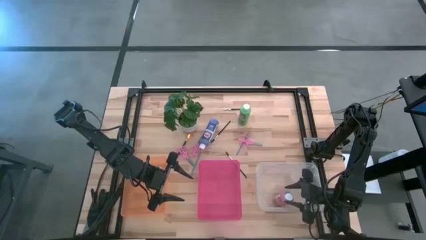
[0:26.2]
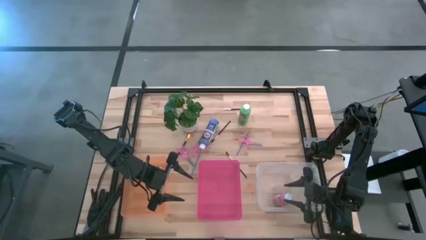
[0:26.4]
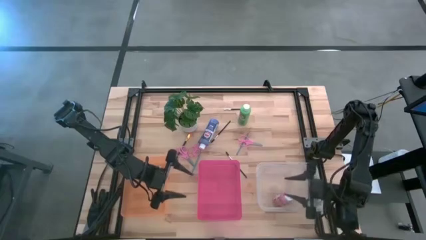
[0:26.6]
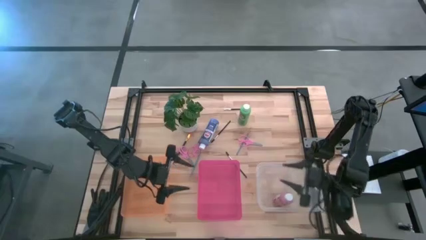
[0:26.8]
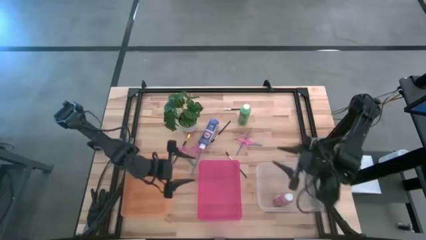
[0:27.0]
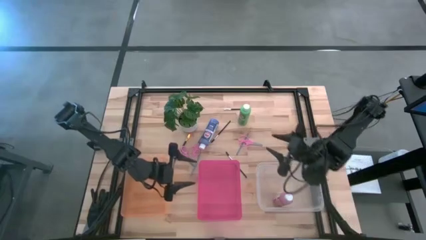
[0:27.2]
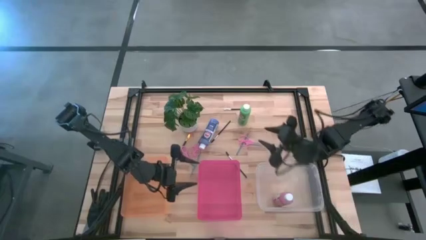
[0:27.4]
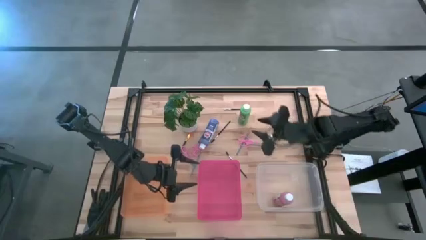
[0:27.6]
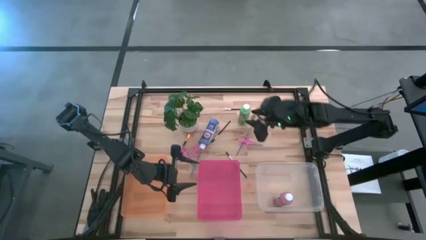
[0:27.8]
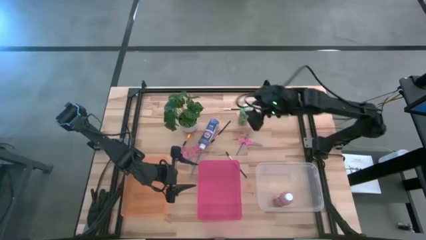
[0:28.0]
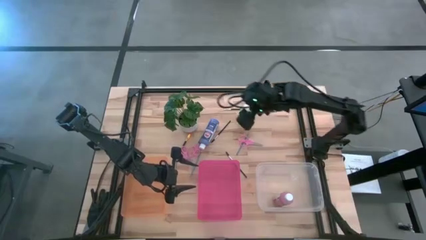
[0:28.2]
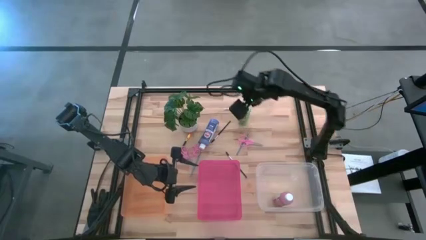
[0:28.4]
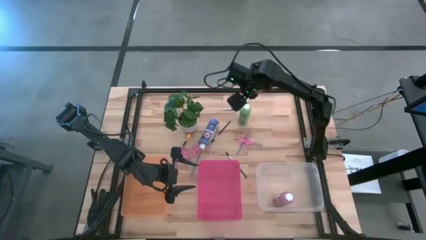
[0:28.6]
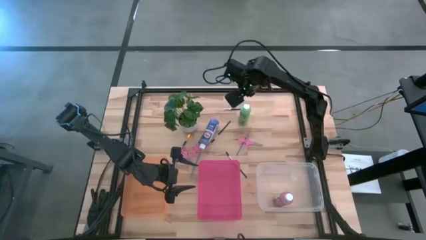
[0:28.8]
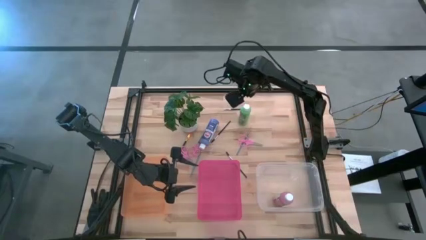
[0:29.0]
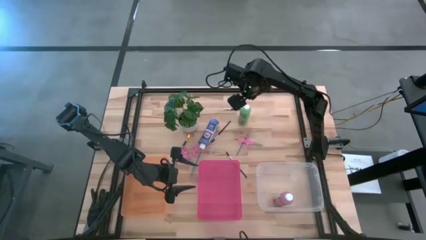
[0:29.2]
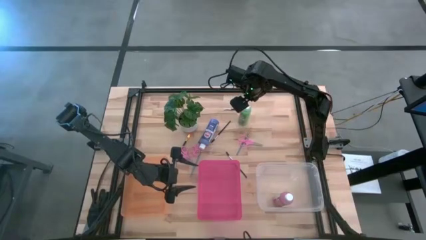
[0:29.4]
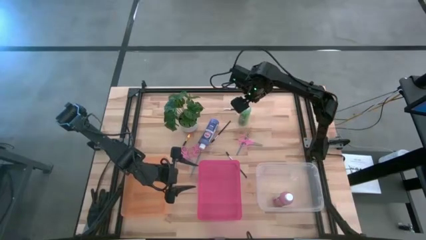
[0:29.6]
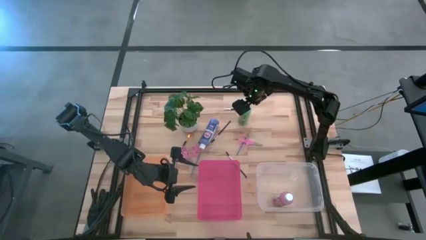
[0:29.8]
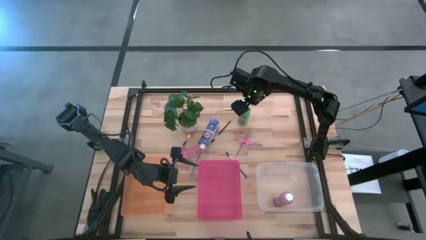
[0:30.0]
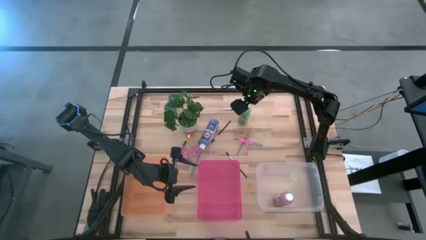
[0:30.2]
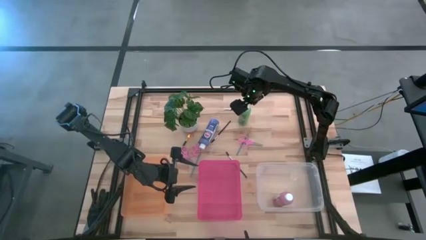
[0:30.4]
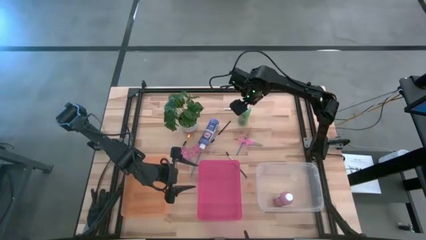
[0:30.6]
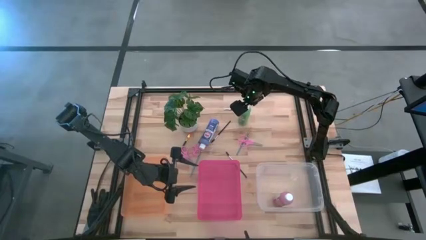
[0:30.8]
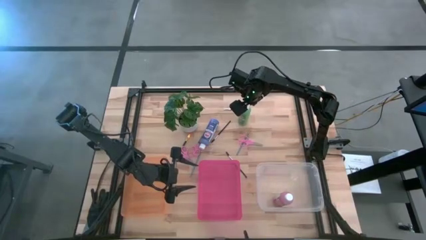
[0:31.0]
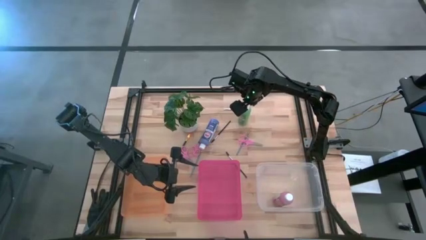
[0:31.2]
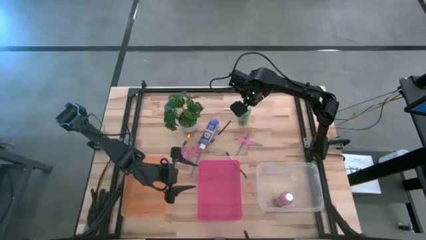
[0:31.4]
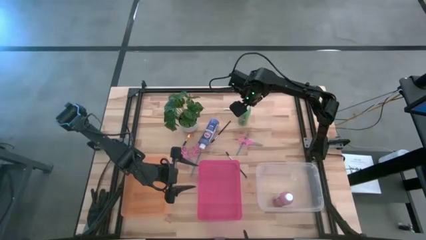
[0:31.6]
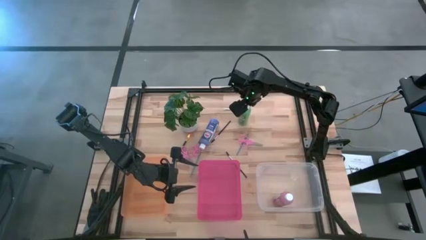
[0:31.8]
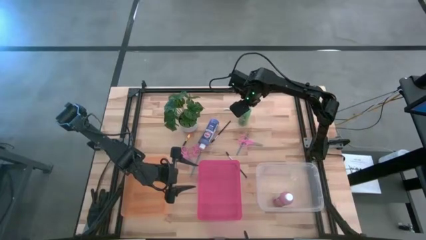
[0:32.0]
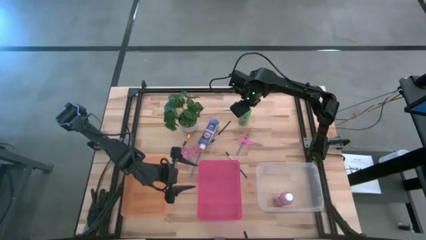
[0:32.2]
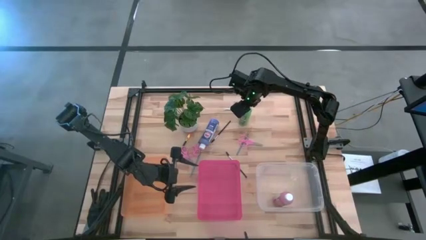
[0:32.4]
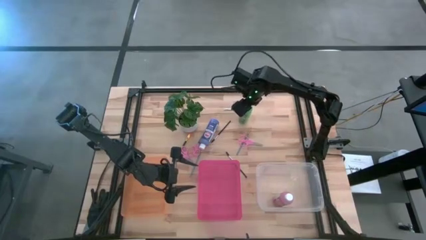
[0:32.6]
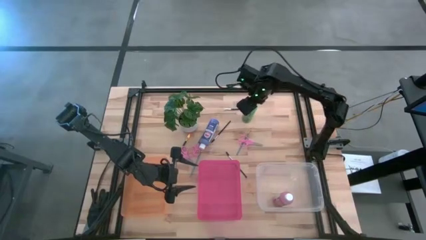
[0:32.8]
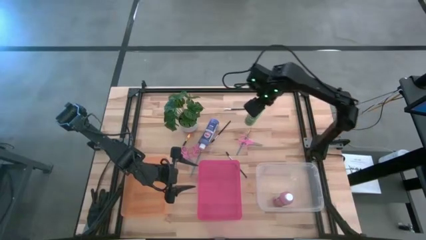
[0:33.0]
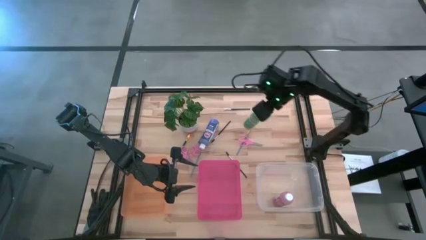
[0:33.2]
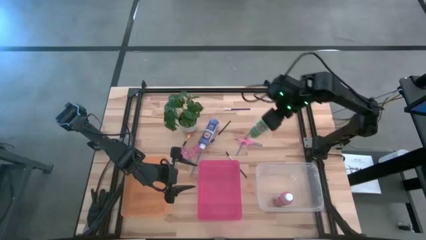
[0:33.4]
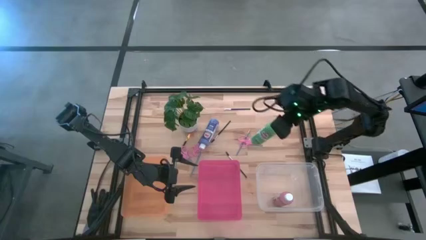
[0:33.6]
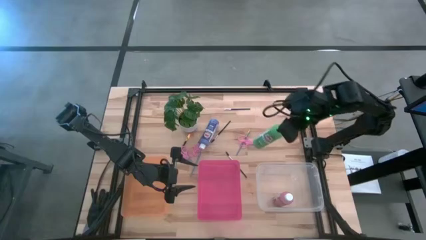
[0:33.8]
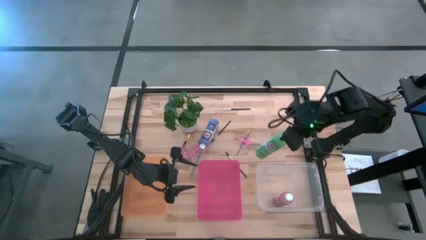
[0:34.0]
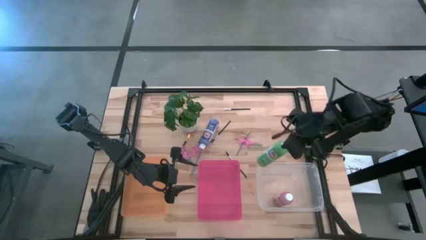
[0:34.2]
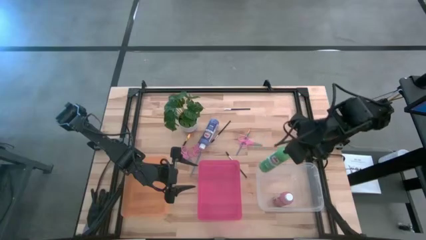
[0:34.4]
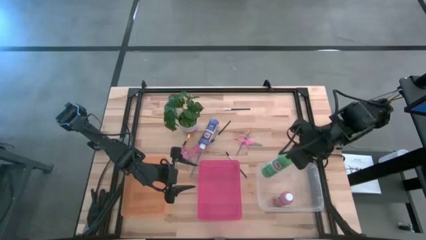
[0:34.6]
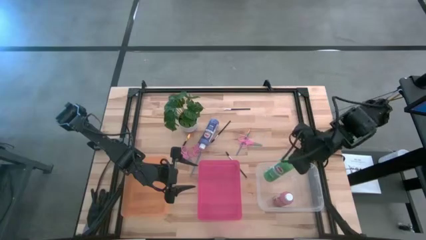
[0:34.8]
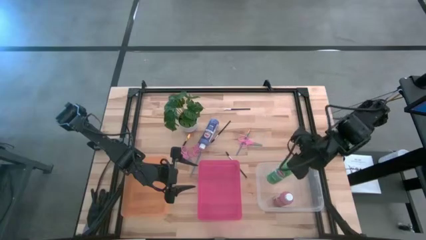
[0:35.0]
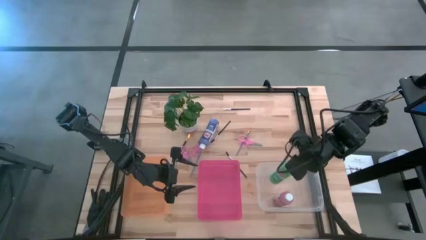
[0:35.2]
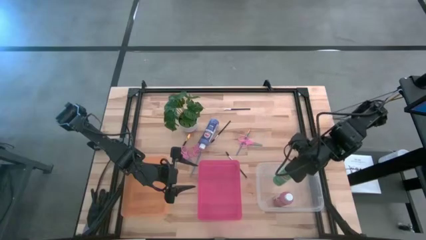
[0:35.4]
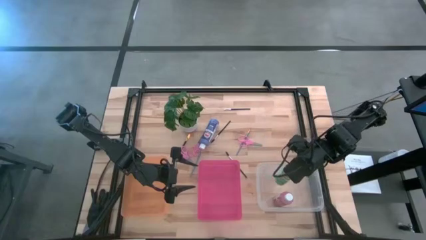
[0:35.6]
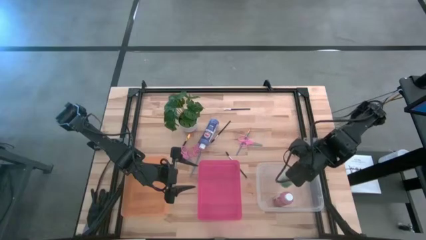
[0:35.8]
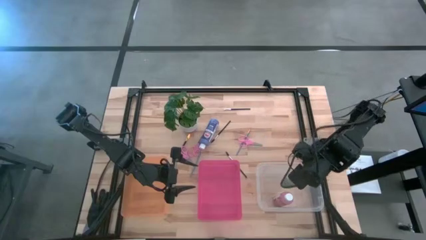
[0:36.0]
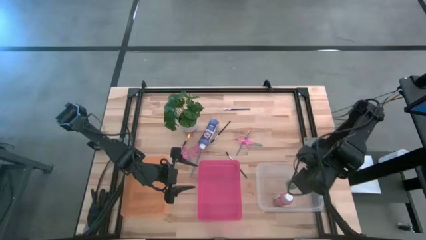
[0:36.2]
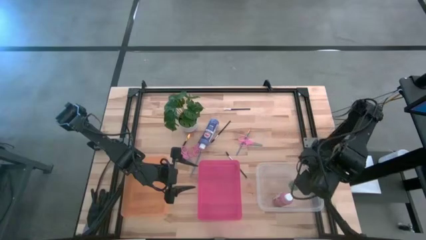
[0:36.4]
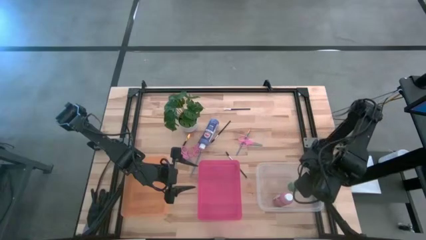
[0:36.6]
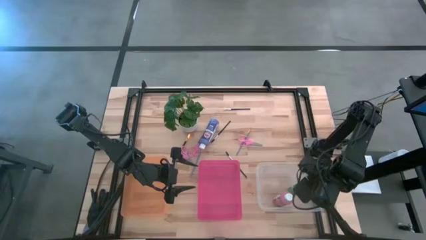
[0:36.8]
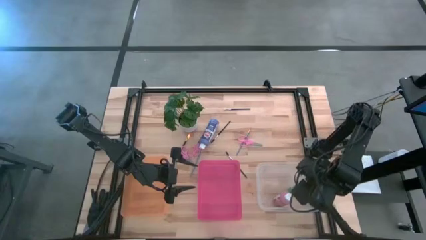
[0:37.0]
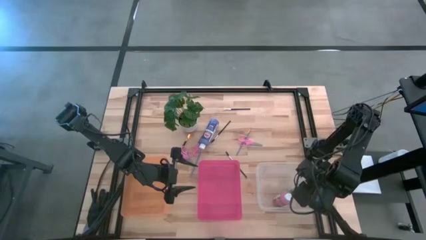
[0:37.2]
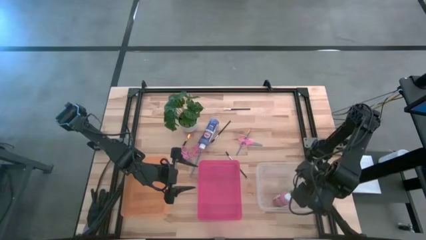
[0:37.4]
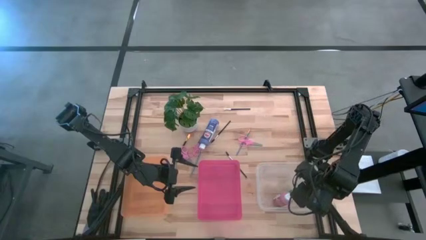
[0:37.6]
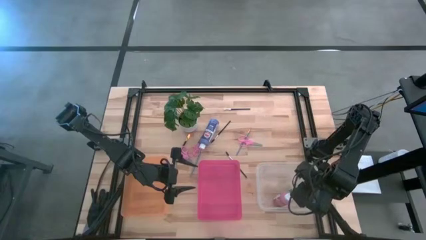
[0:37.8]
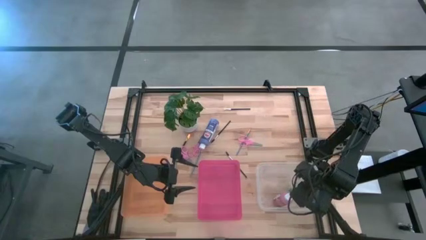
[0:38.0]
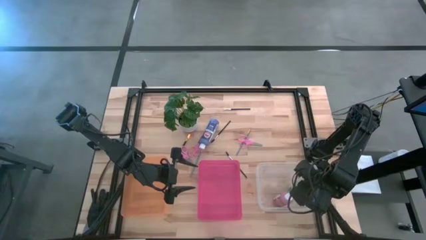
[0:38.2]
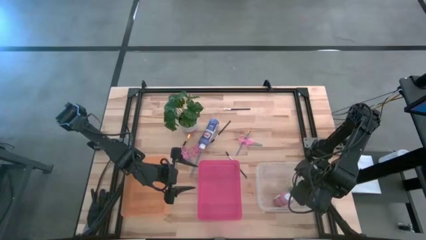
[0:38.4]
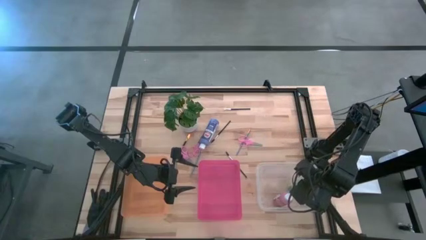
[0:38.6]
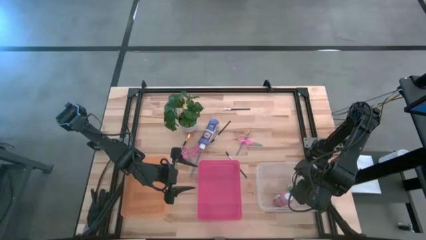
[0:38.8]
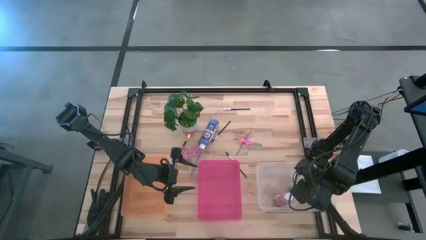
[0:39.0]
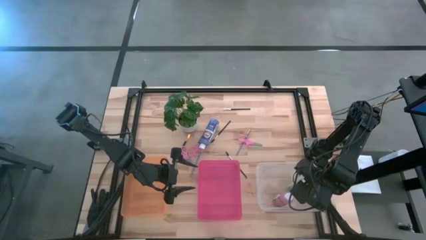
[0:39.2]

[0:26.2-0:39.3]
Task: Pick & Place Paint Supplies
Put the green paint bottle into the transparent bin

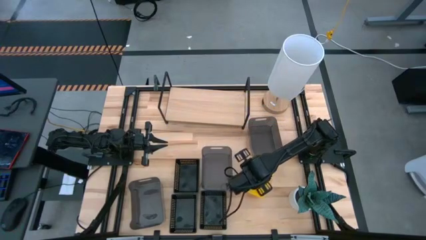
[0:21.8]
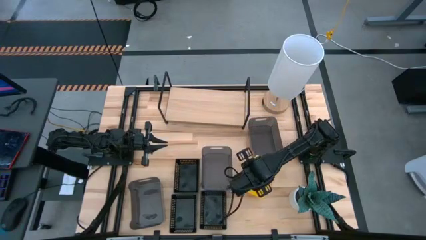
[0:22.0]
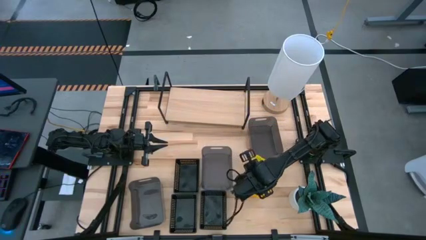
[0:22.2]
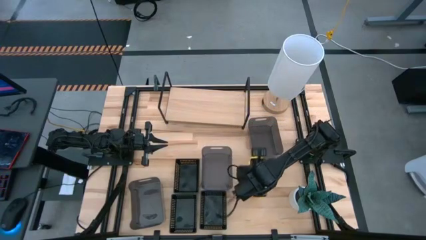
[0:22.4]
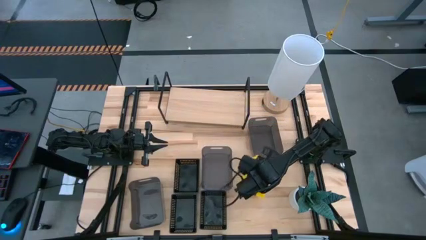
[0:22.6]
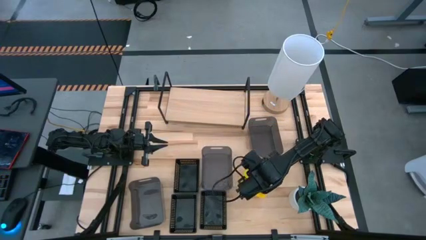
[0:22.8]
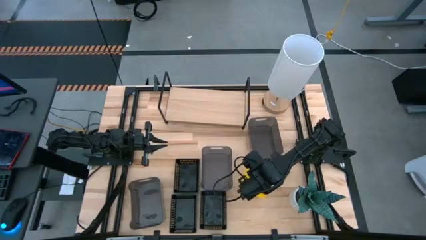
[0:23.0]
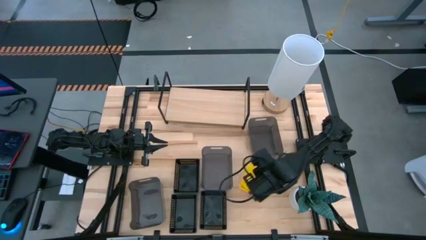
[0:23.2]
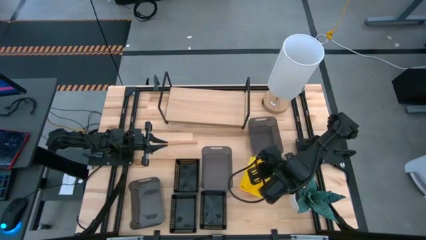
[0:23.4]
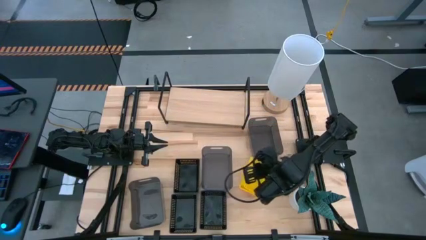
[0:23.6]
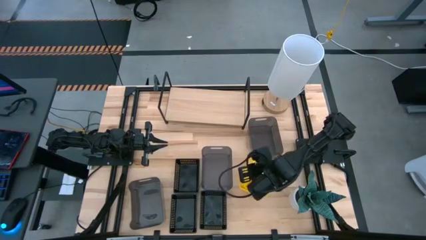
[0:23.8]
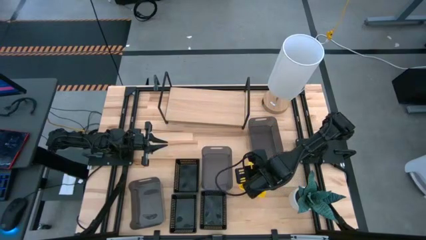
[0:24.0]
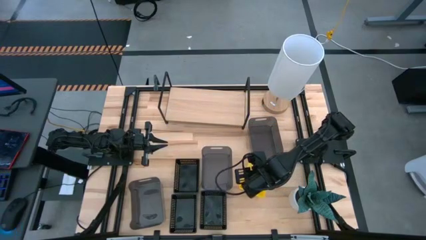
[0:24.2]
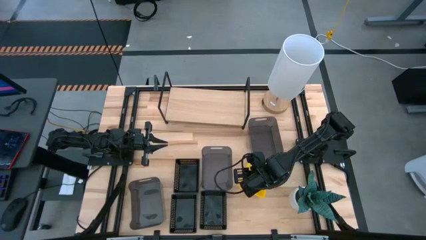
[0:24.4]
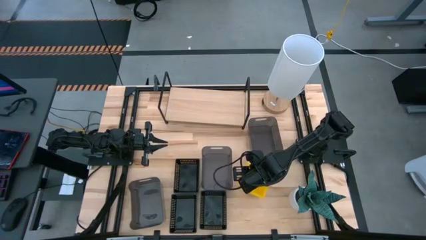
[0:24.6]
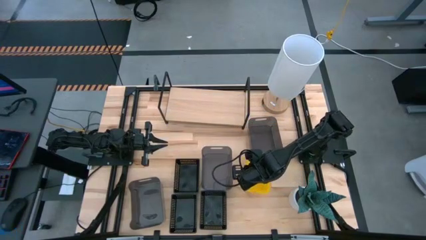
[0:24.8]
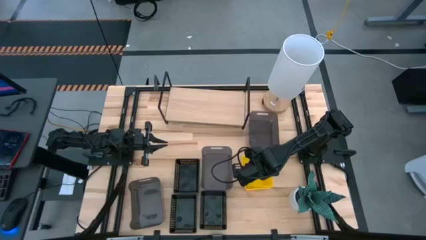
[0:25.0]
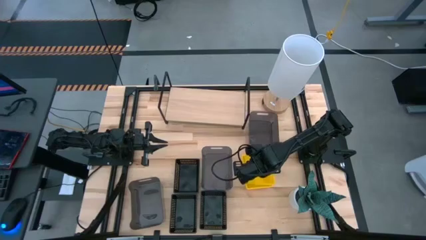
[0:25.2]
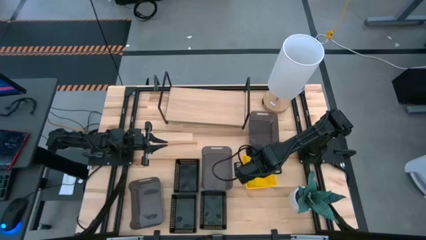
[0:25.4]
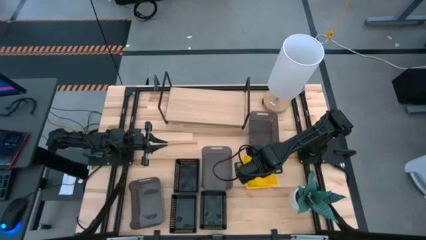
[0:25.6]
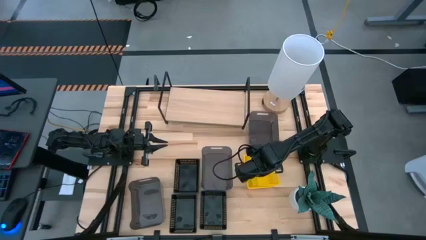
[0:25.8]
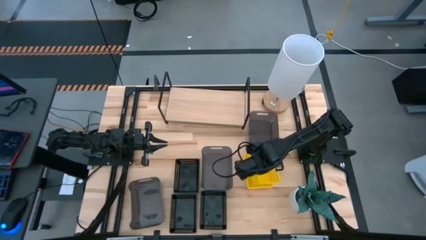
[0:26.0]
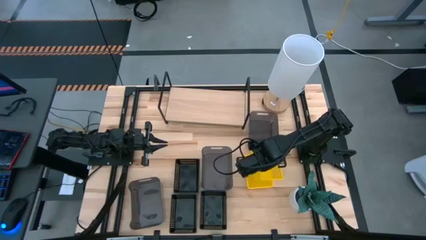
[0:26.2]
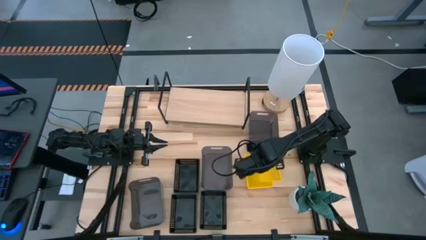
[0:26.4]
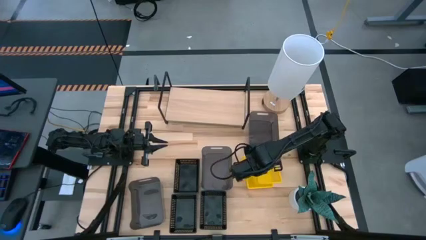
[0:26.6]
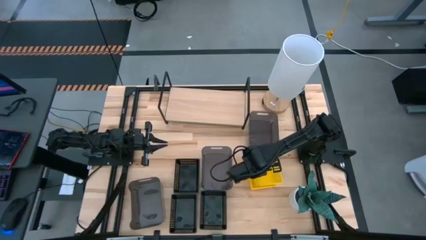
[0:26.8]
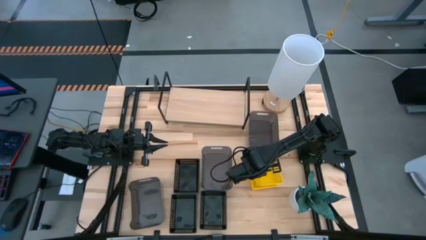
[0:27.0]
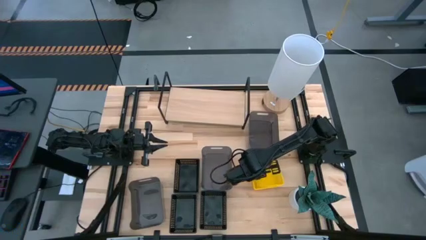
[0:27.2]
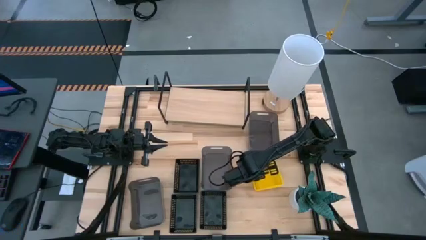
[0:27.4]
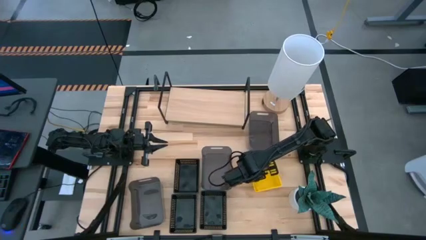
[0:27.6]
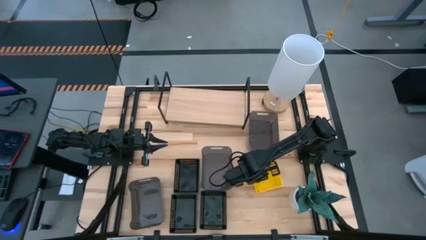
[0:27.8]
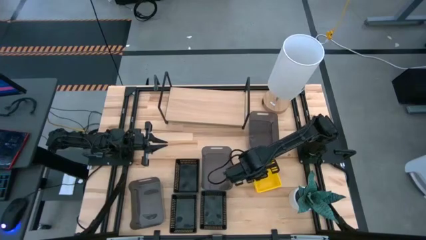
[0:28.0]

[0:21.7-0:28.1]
Task: Stack baskets on shelf by color
Stack the top yellow bin on top of the other stacked yellow bins
